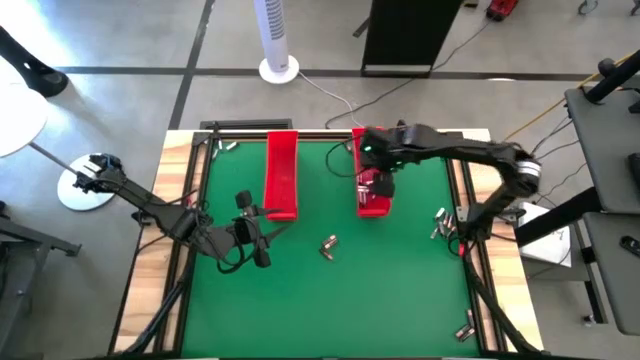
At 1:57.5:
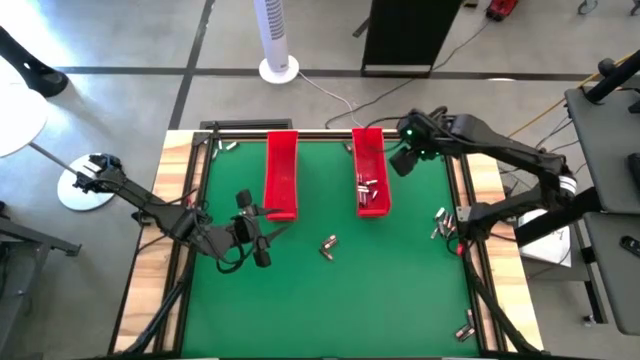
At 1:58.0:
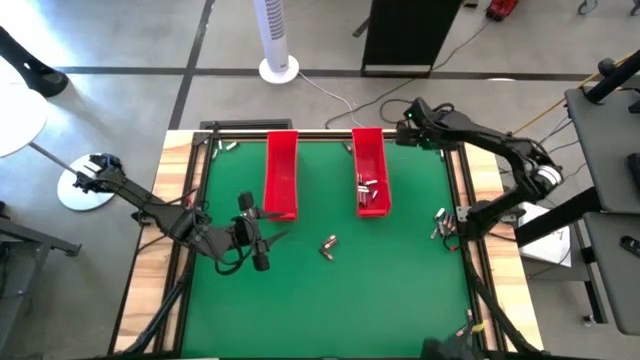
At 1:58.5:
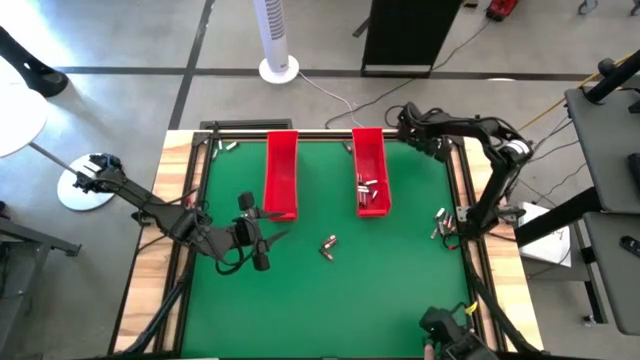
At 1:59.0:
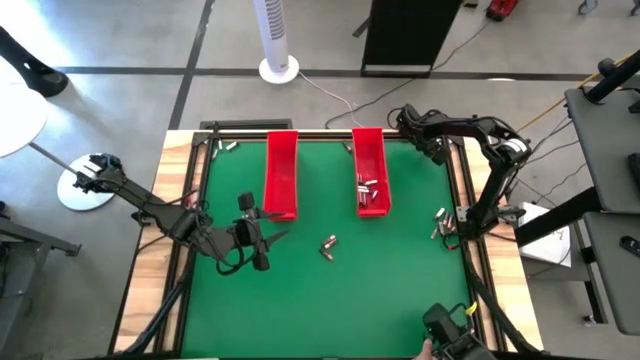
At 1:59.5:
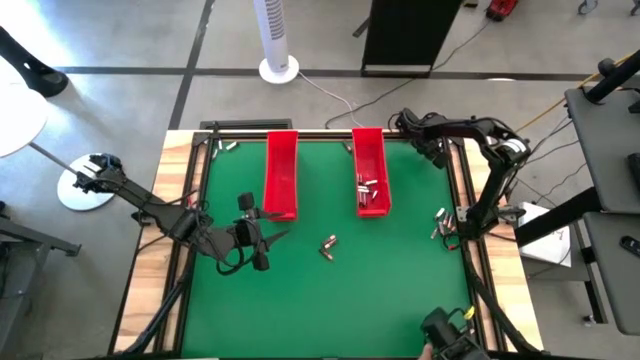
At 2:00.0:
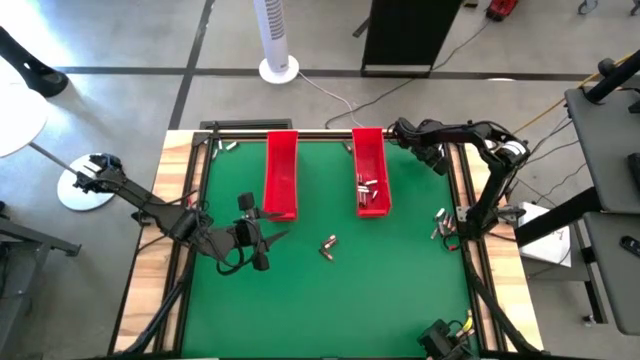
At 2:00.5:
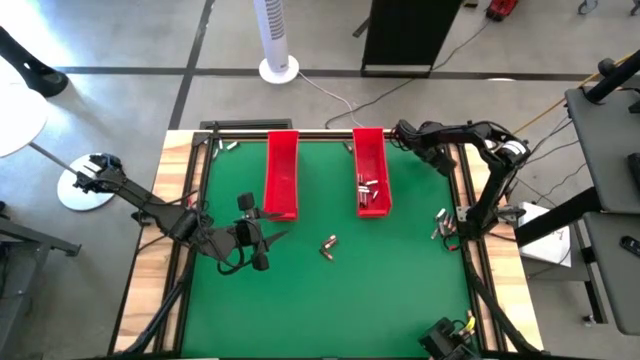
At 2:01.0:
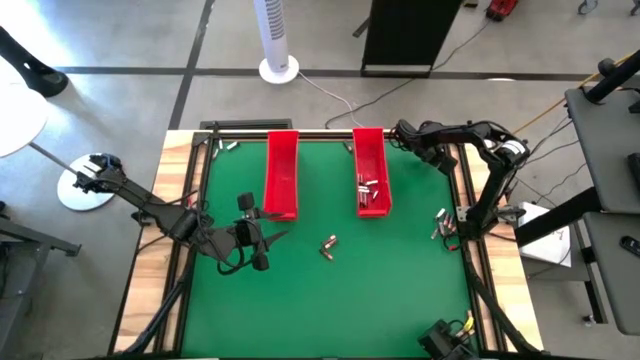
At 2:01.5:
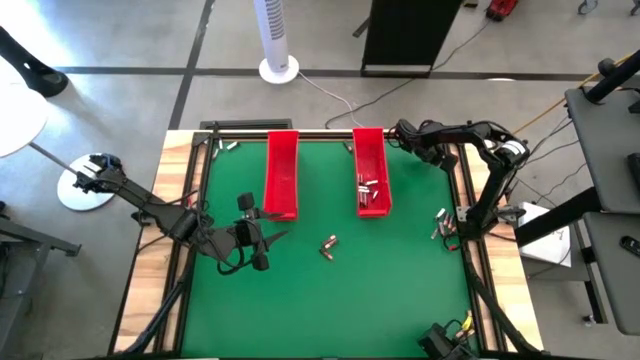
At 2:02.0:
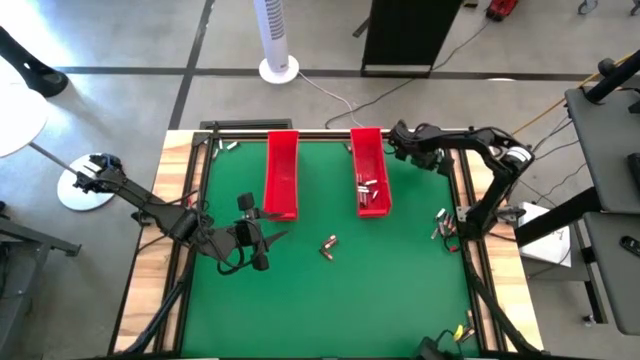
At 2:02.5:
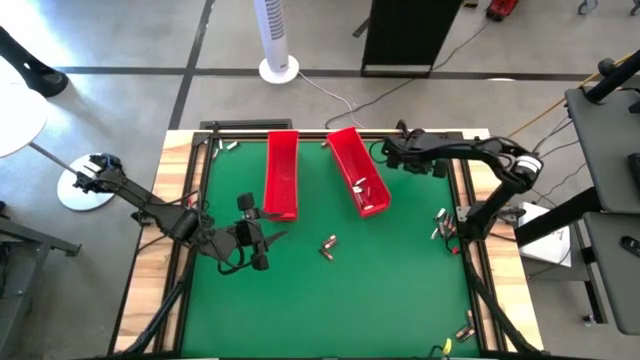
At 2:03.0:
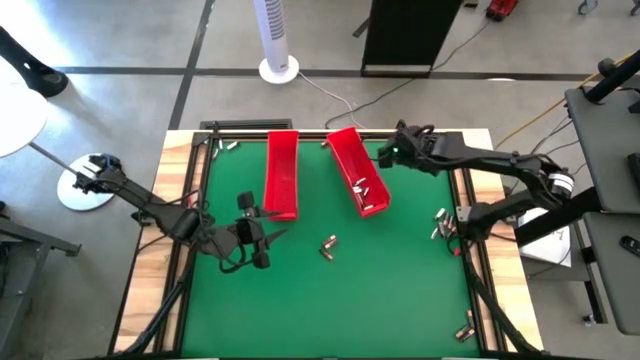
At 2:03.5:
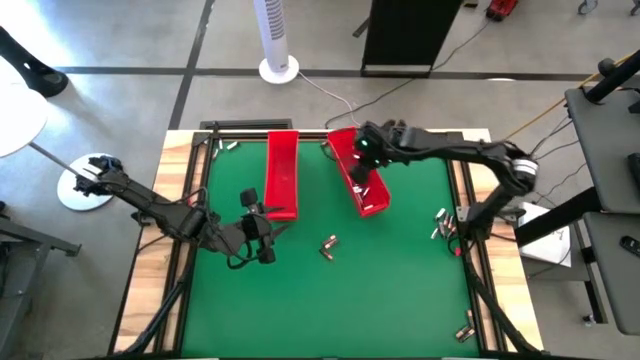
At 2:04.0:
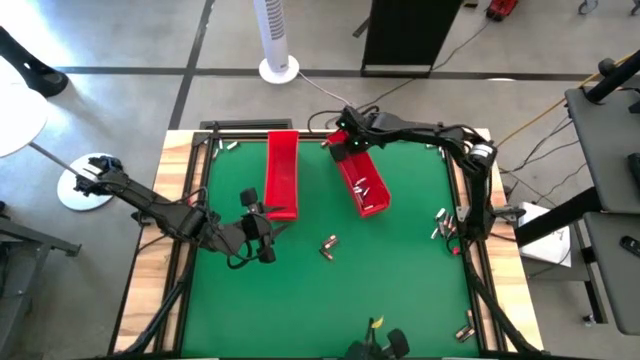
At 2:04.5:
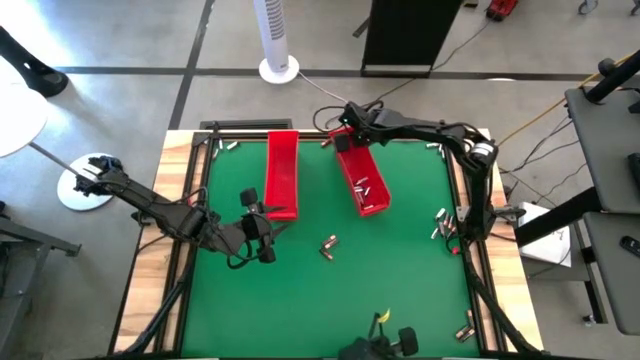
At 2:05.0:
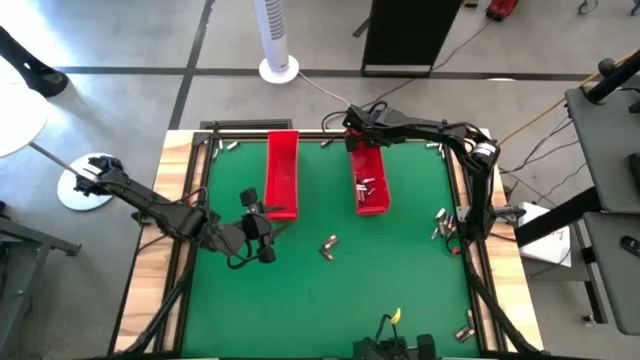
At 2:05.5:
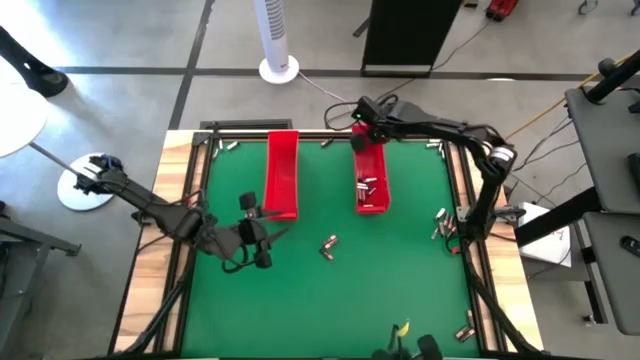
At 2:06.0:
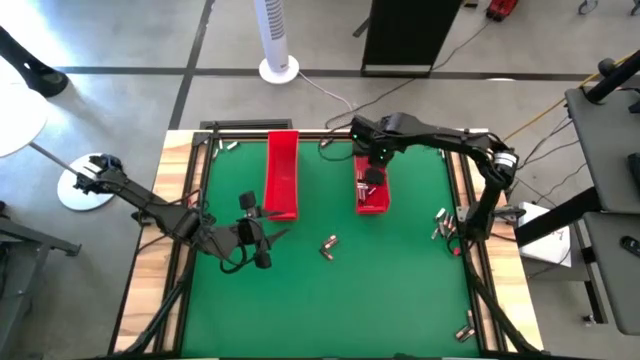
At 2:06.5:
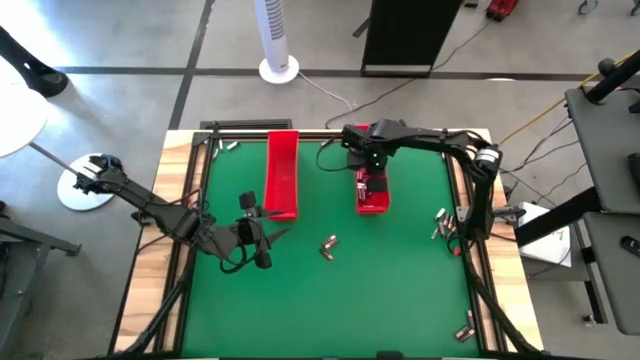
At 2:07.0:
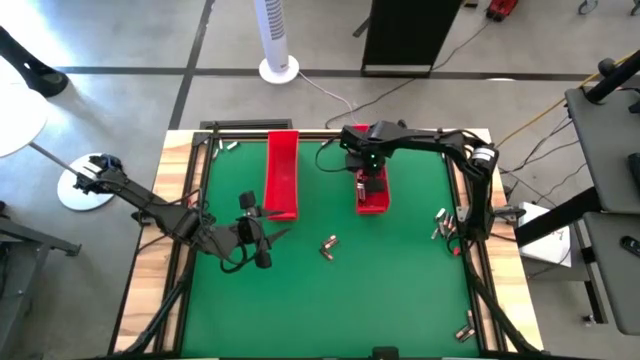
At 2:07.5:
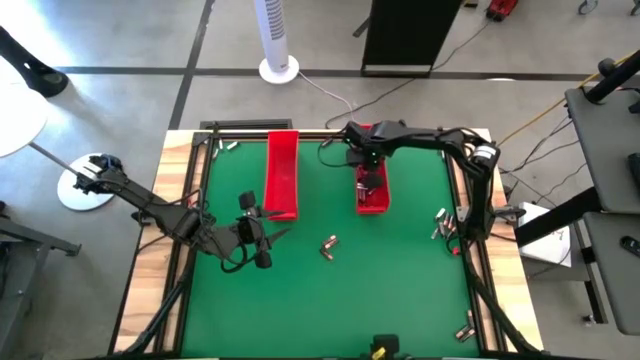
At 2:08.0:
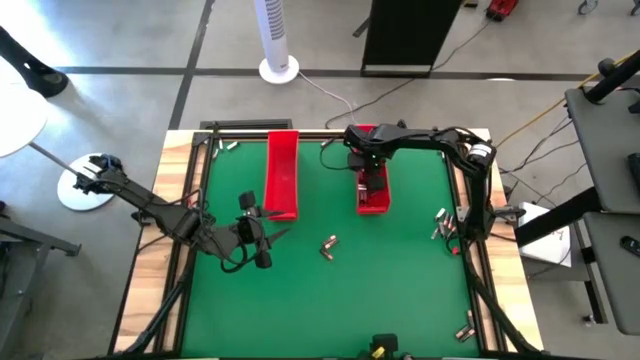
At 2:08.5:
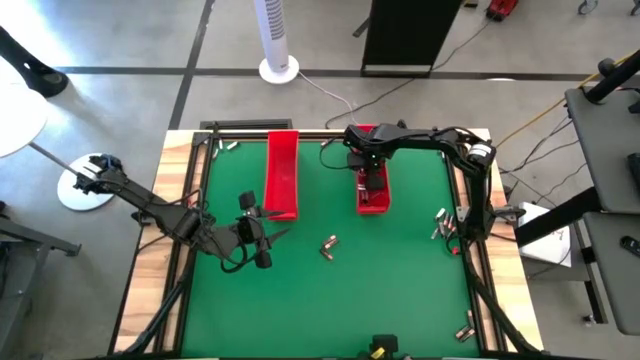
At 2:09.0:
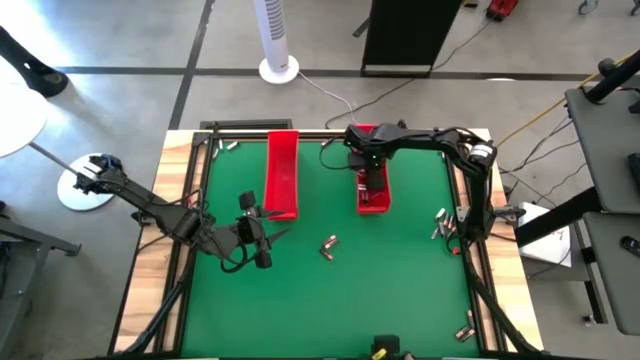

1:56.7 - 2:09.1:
Task: Sort batteries
Put the silver battery into the right red bin

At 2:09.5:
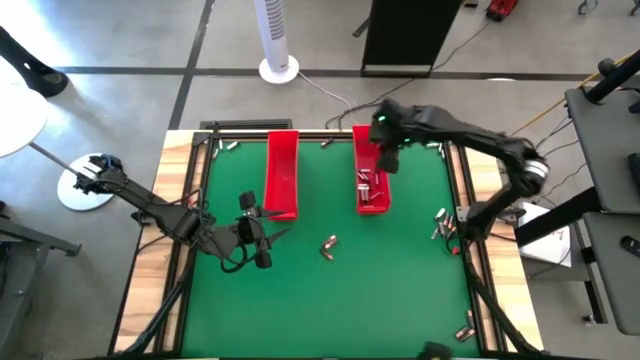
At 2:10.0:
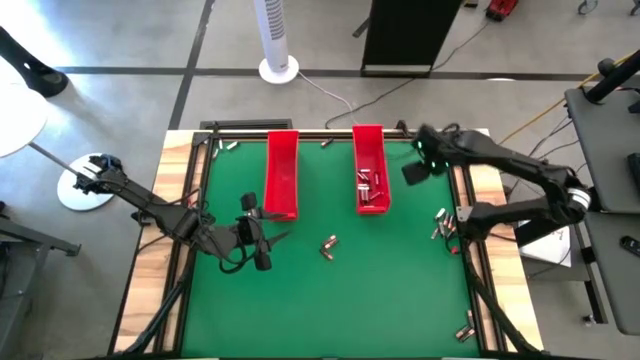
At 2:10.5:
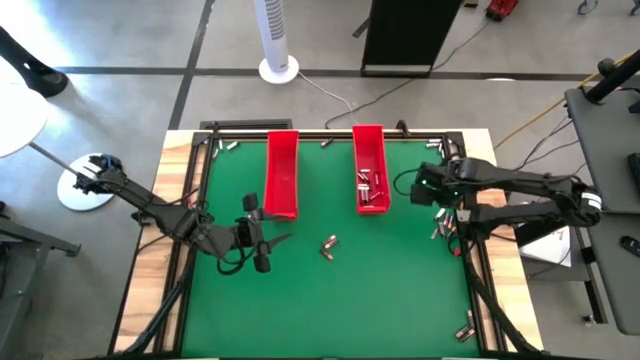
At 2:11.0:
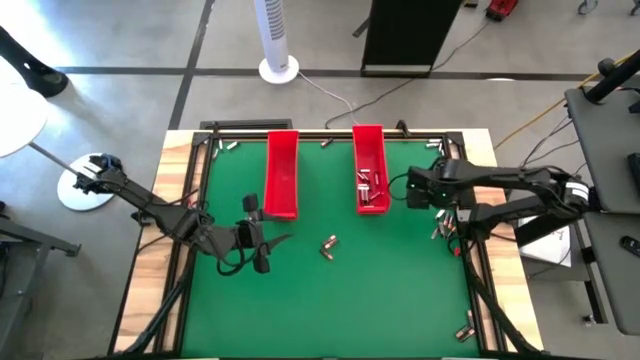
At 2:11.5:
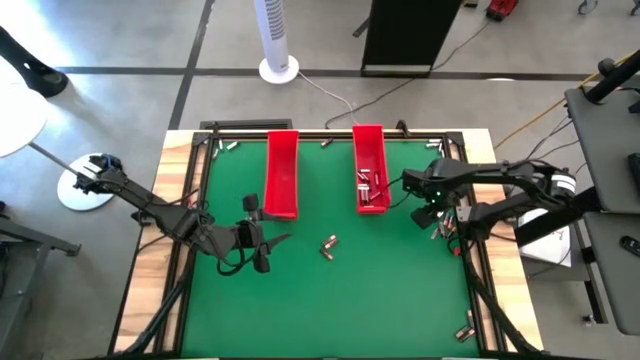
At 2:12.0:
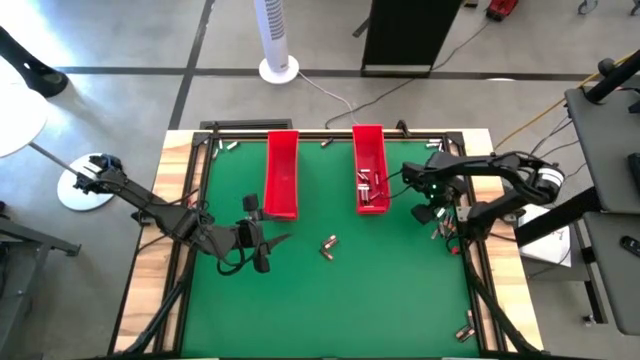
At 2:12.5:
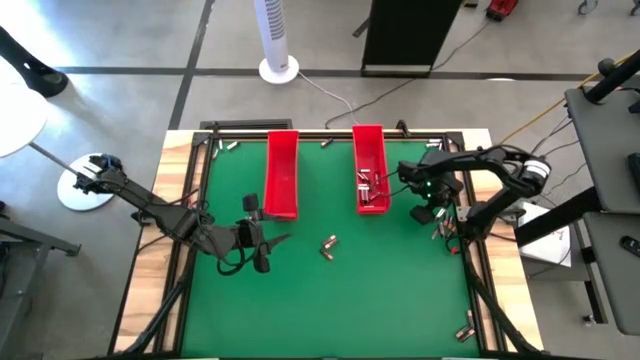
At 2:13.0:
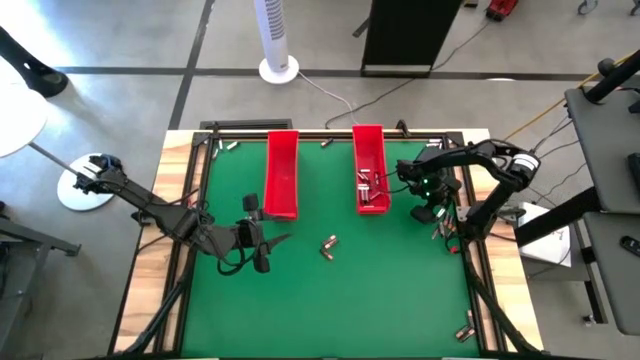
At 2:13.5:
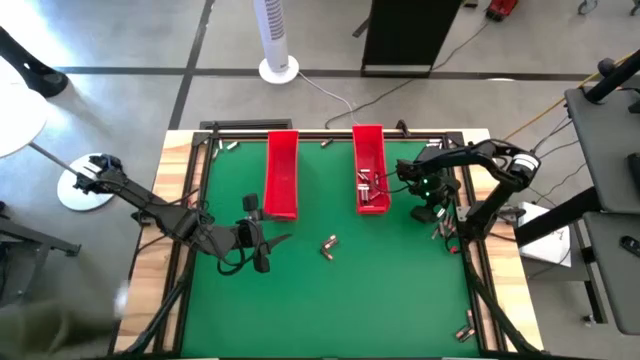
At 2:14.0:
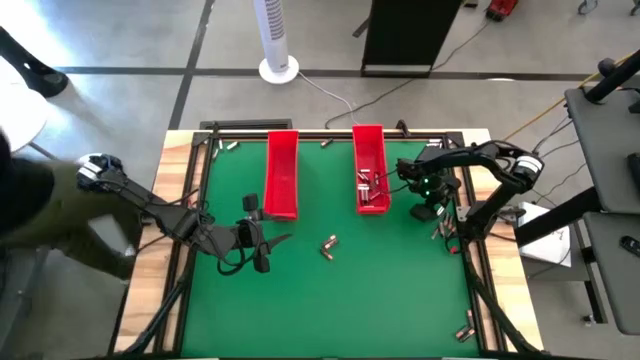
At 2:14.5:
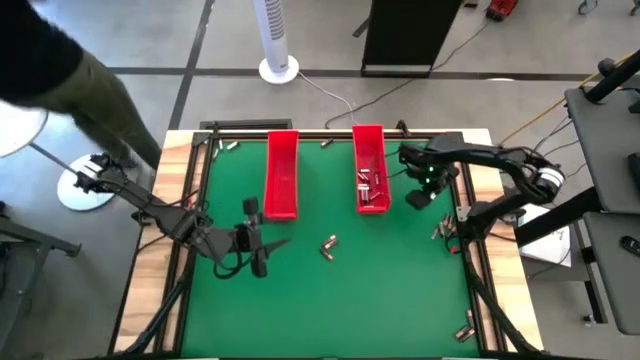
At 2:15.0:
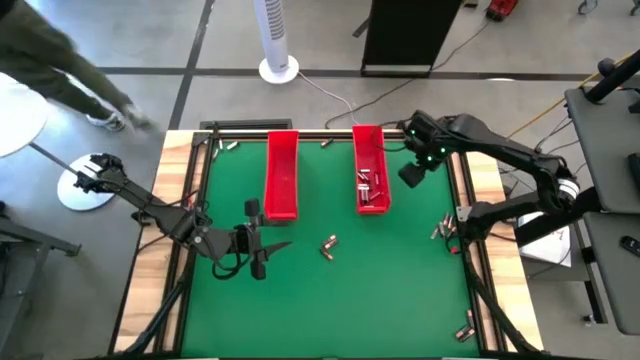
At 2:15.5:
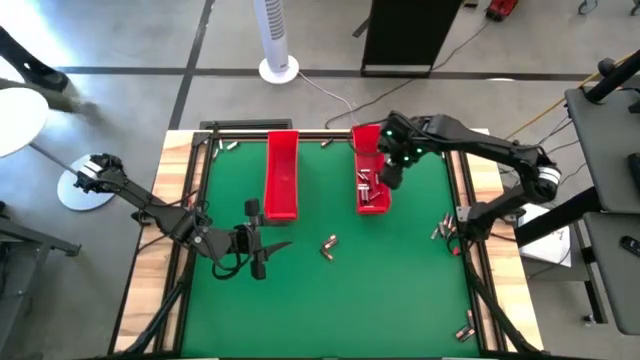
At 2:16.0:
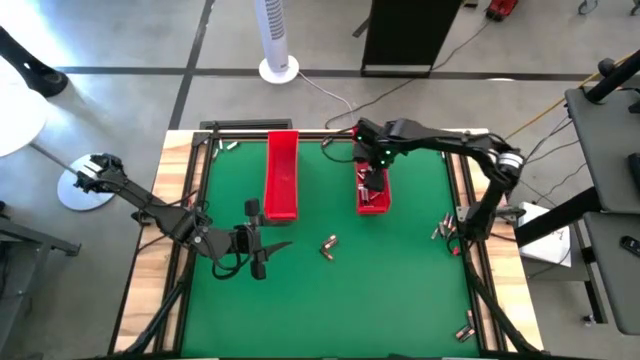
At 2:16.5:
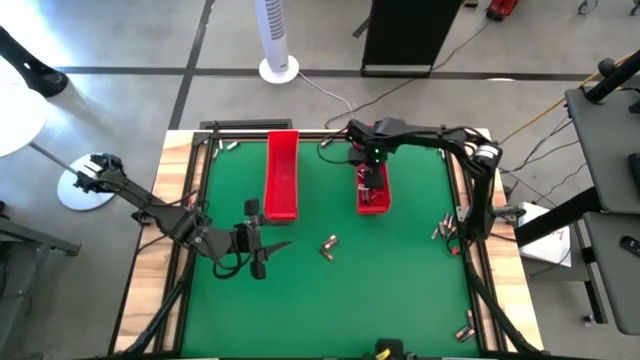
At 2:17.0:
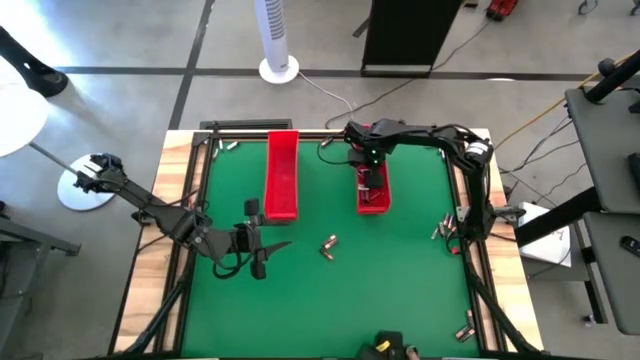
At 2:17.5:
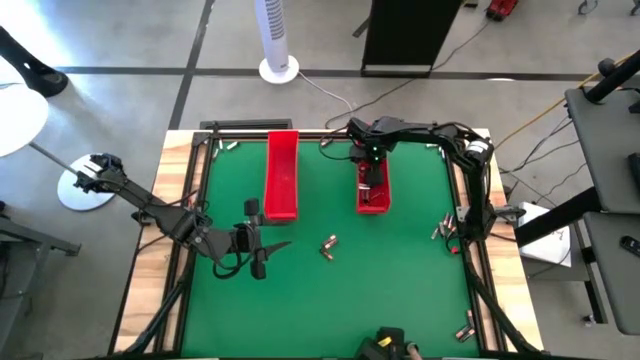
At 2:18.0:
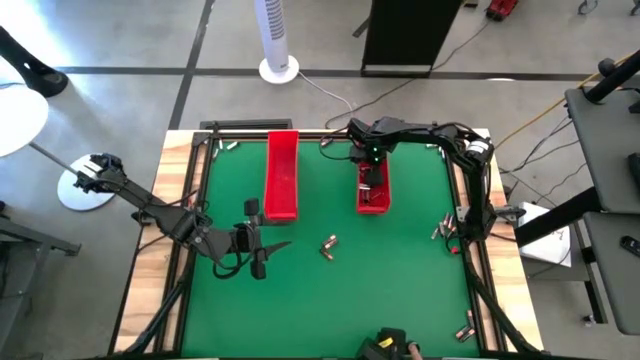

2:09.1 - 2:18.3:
Put the silver battery into the right red bin
